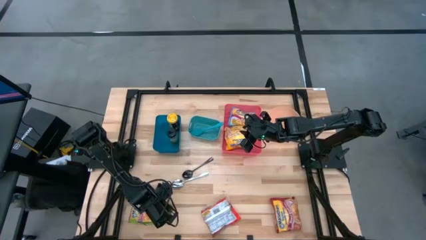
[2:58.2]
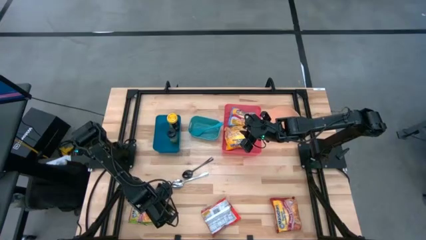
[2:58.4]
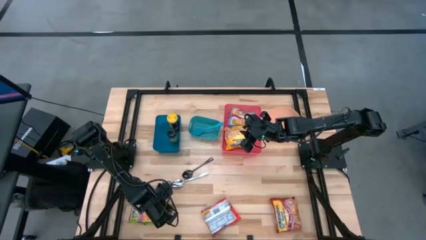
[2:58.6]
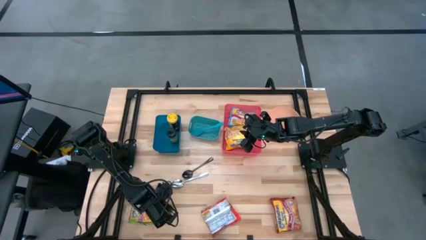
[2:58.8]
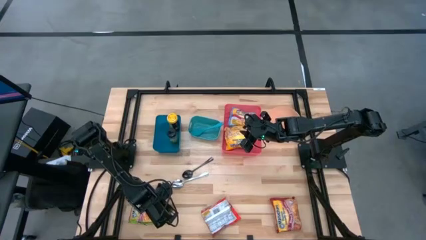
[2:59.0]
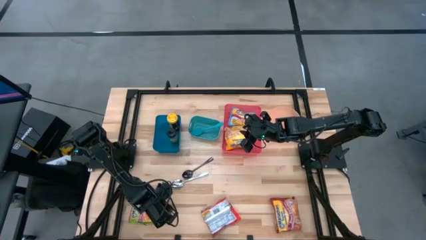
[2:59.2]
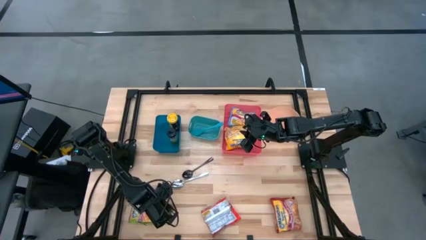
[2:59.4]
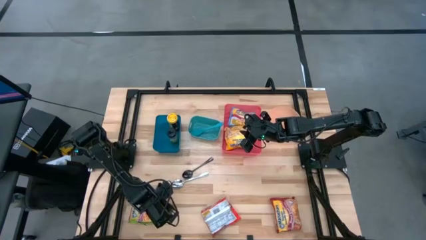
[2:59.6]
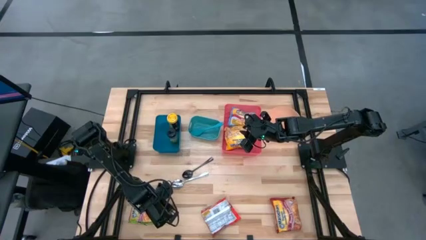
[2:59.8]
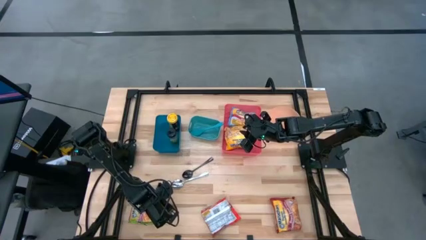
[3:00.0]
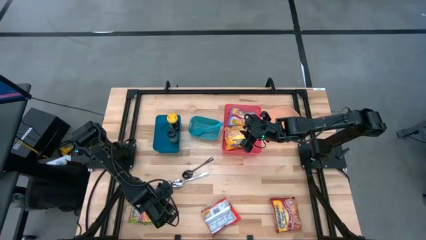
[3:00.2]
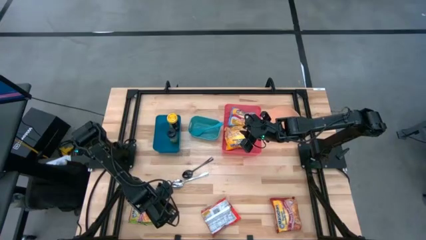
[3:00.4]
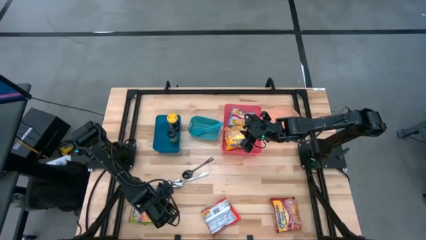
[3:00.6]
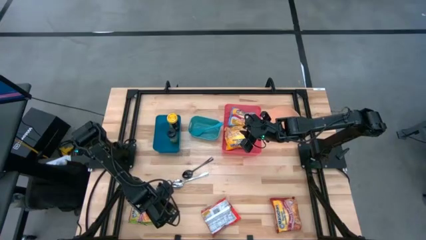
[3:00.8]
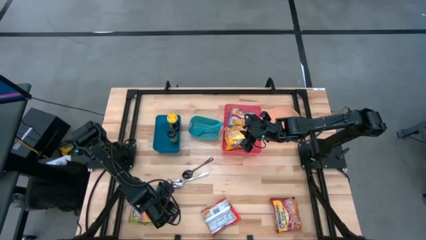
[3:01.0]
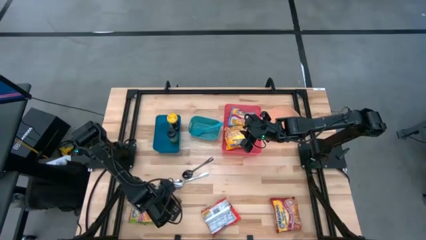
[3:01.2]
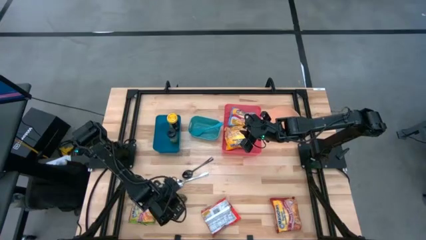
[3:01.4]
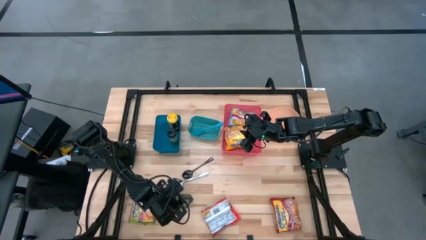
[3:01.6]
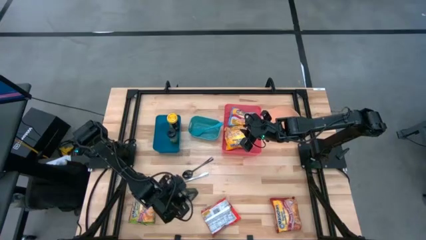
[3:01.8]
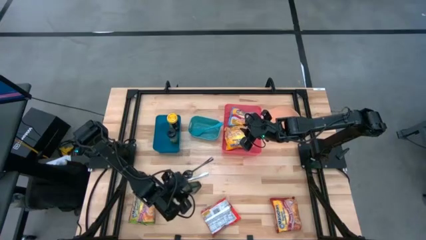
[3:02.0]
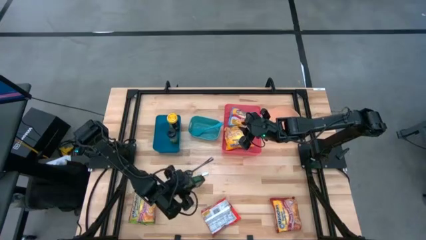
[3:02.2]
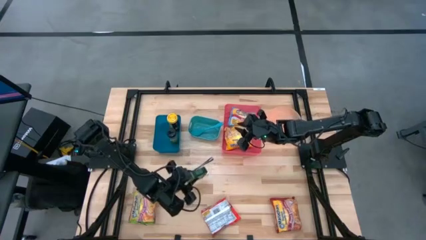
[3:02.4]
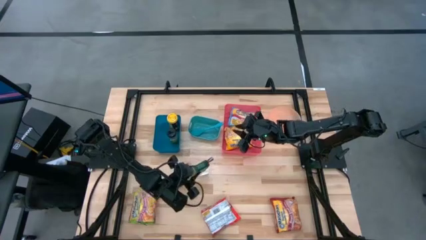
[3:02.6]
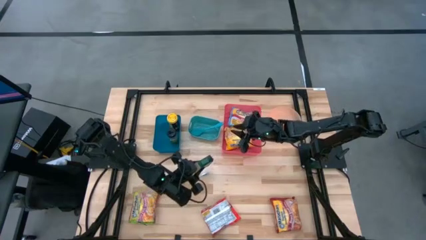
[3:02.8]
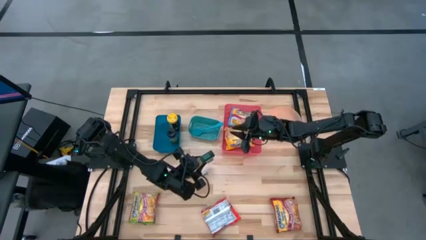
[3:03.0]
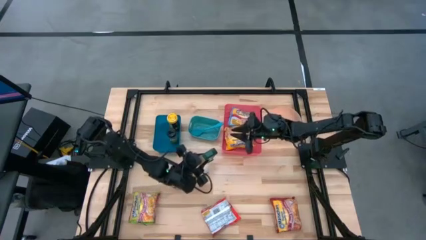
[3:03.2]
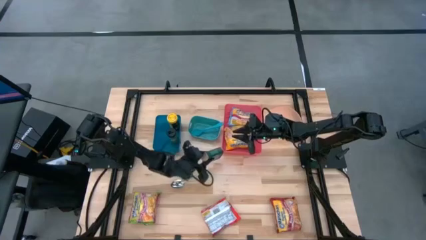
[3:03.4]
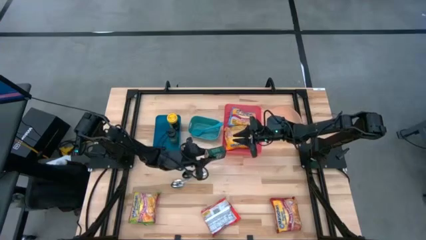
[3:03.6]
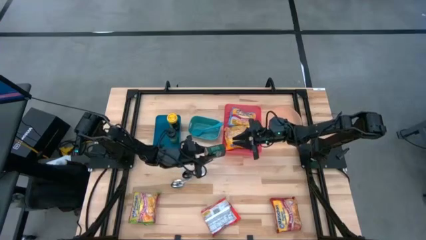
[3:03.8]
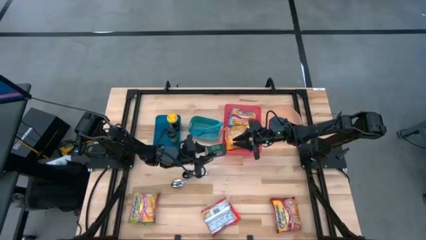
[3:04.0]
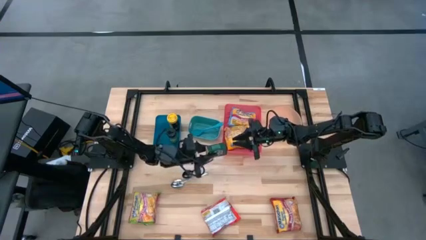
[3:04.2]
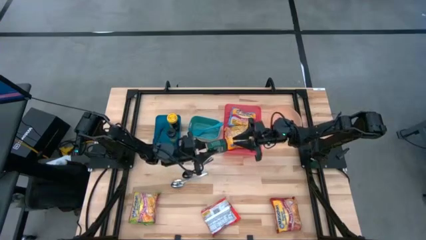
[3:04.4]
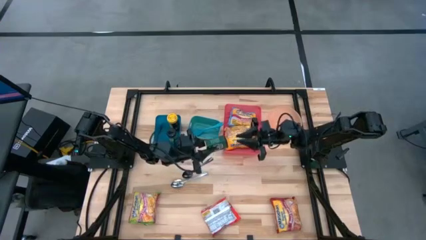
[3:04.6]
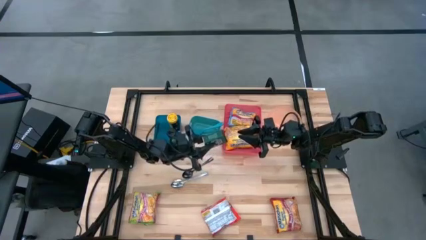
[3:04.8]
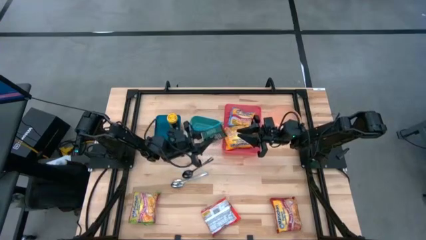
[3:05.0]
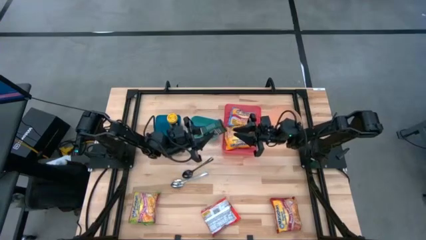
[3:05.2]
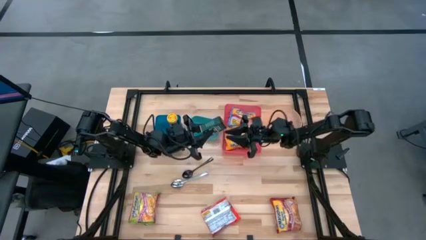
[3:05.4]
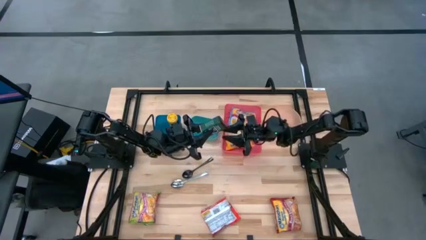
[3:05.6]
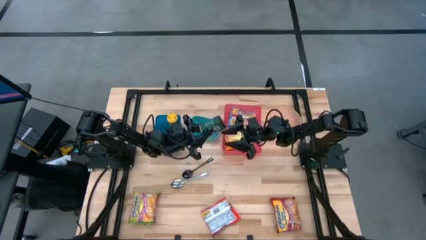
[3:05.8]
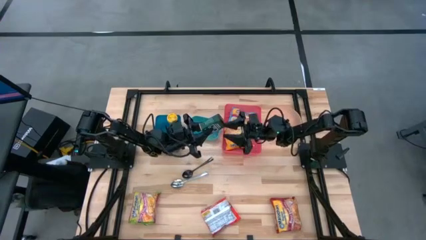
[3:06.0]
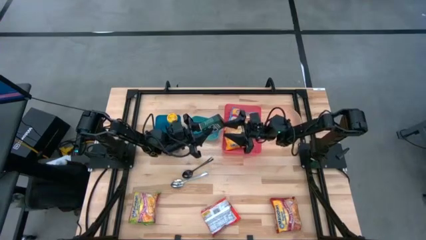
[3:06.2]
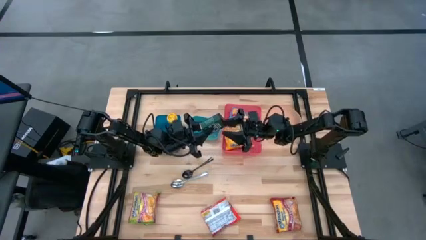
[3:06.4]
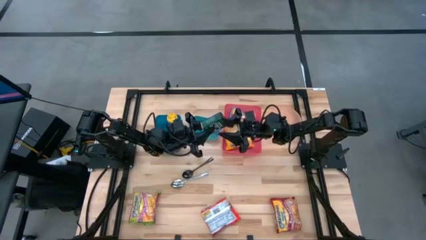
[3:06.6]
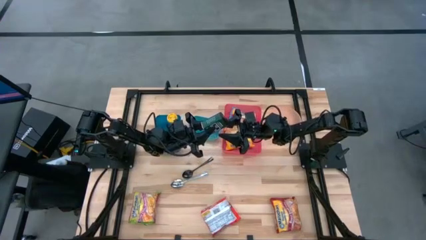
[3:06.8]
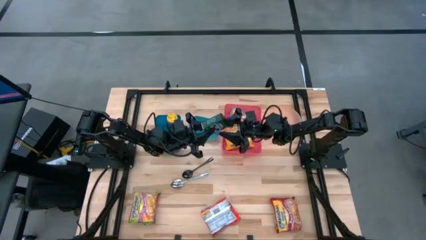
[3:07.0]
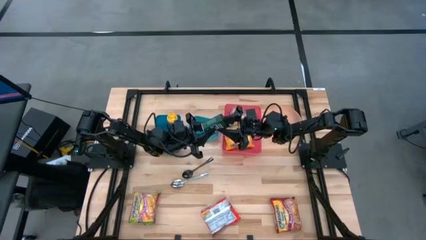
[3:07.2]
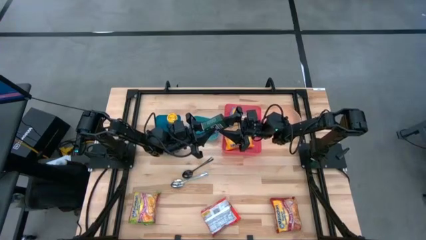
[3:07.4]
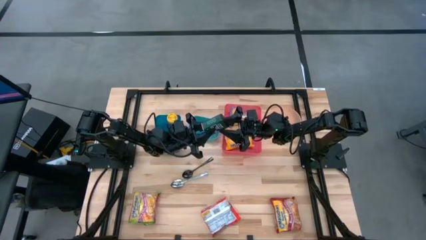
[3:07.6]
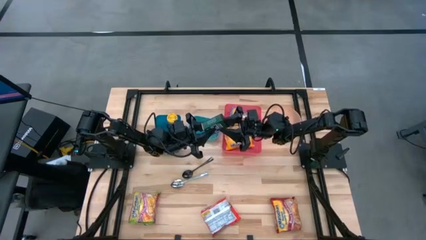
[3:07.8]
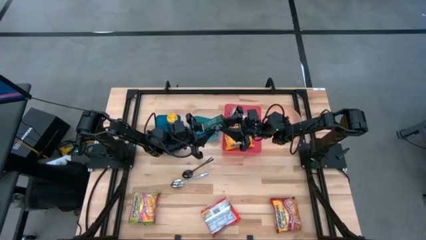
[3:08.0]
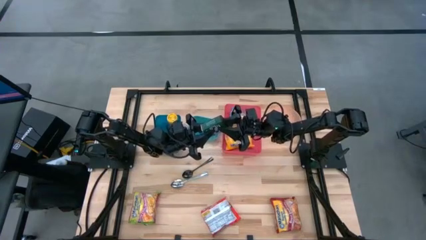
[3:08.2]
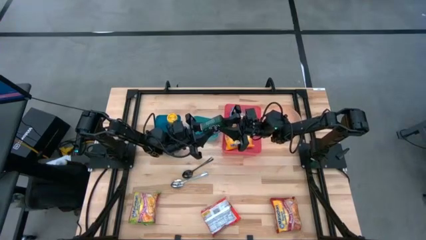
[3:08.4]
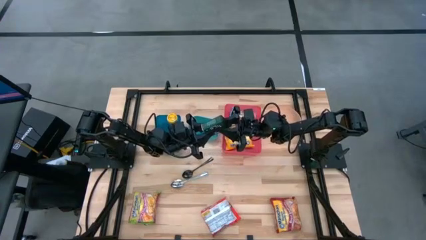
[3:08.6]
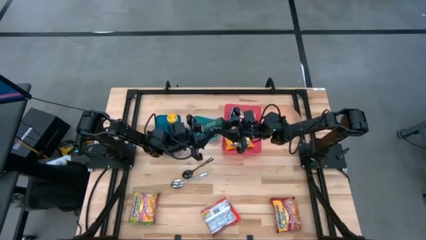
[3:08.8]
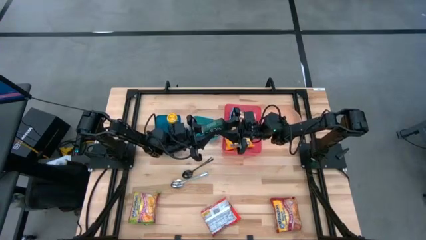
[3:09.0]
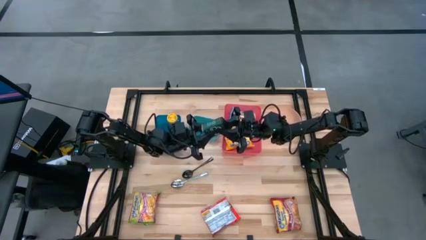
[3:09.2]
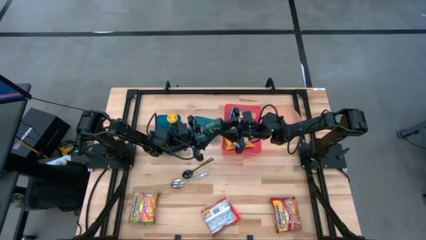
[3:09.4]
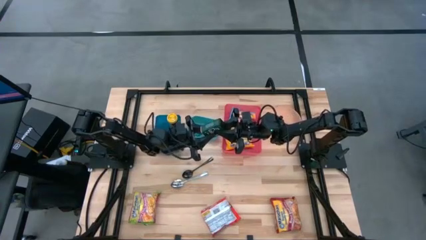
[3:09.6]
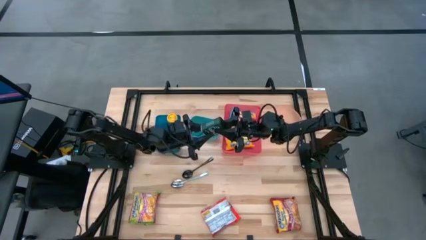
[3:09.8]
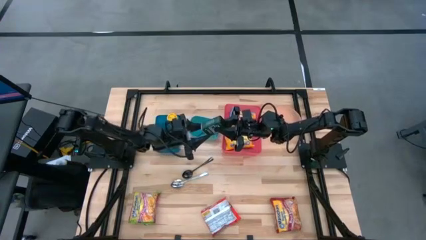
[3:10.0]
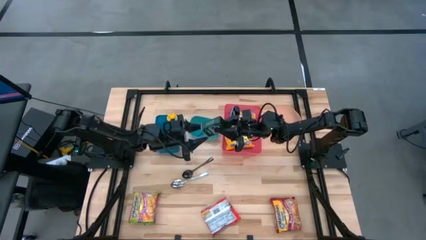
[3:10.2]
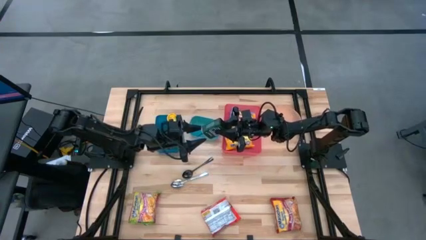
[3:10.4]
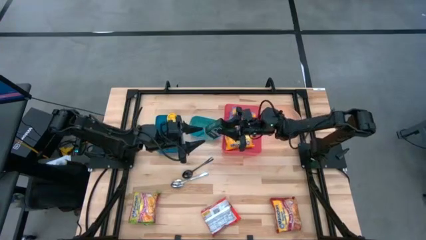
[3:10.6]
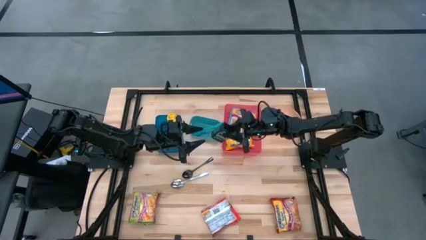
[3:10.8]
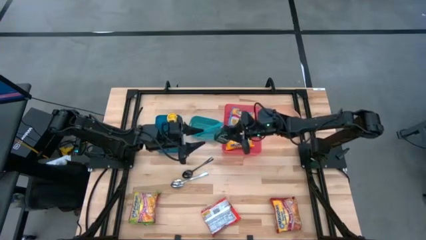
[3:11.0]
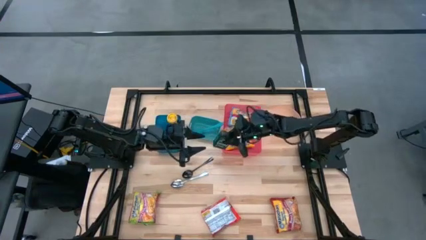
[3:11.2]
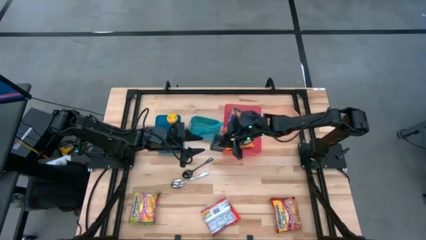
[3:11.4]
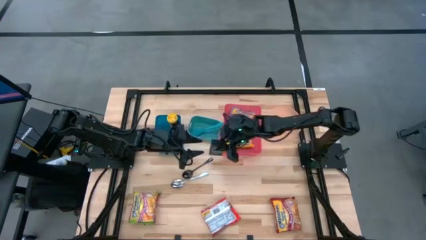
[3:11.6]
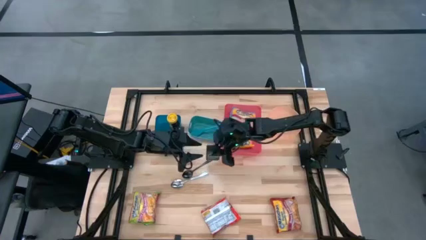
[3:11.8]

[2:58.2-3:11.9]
Task: Pick & Place Food Item
Put the black seasoning can into the blue bin

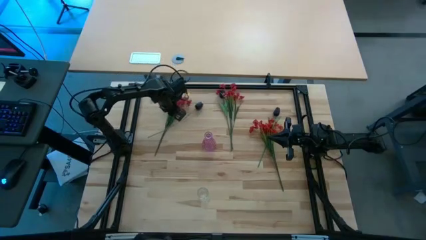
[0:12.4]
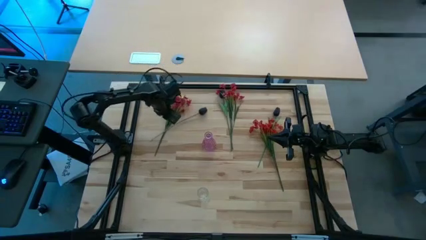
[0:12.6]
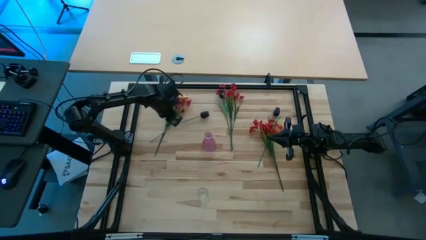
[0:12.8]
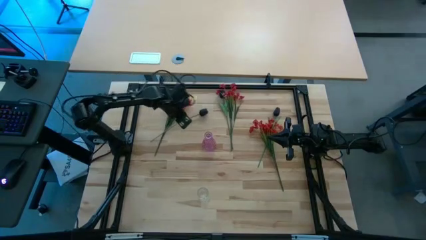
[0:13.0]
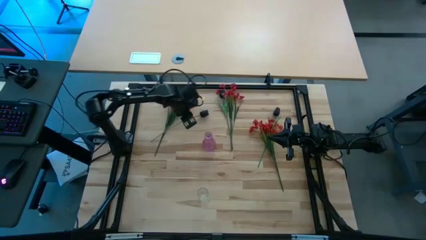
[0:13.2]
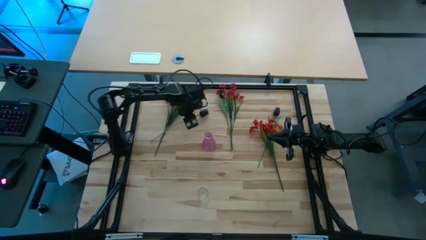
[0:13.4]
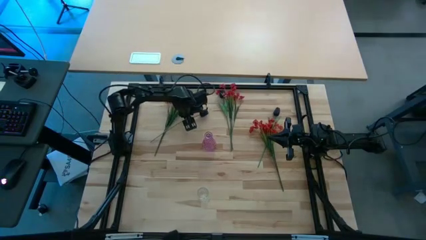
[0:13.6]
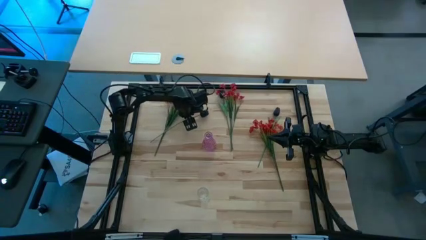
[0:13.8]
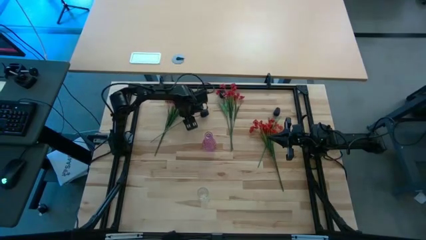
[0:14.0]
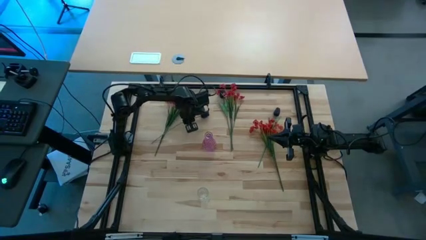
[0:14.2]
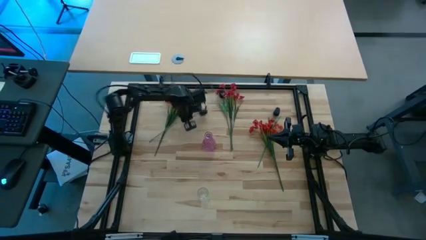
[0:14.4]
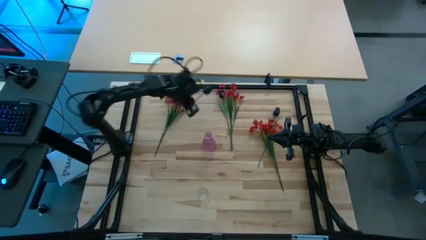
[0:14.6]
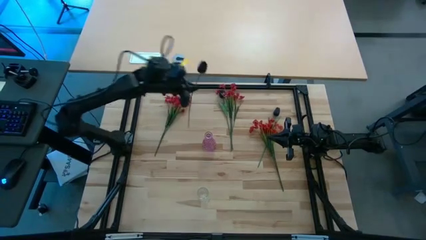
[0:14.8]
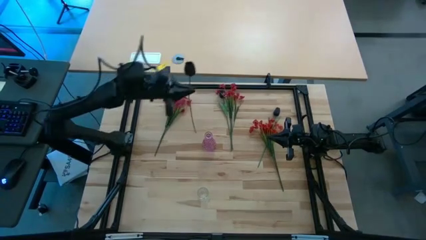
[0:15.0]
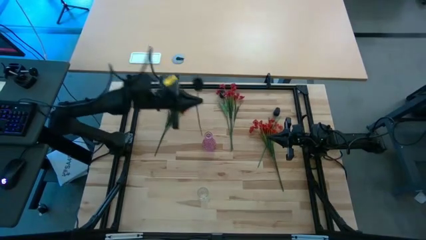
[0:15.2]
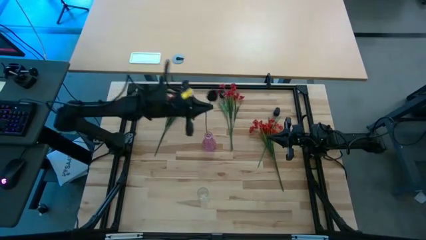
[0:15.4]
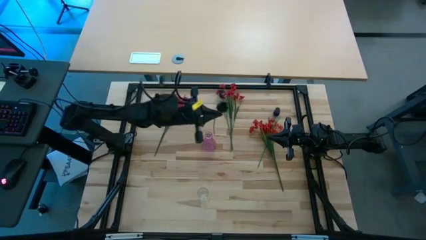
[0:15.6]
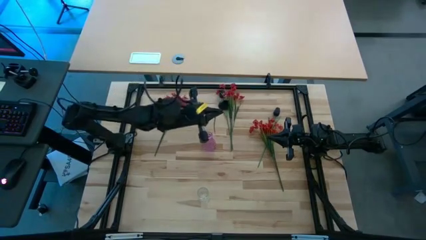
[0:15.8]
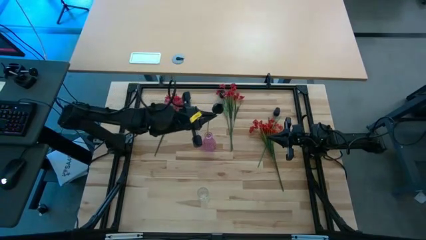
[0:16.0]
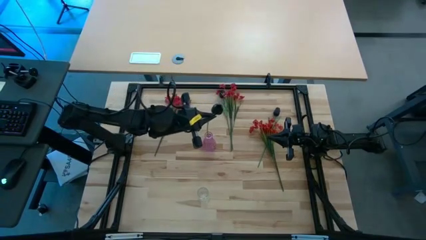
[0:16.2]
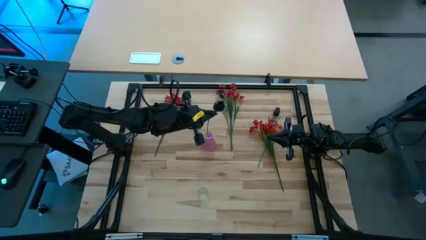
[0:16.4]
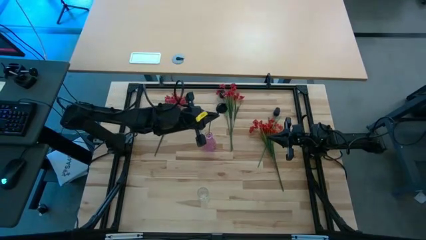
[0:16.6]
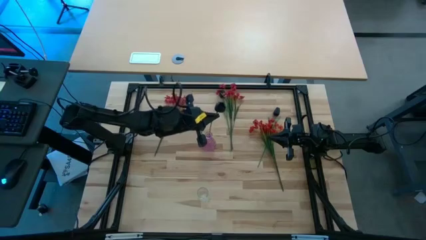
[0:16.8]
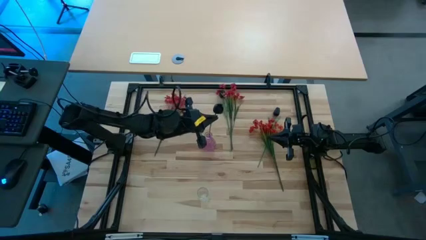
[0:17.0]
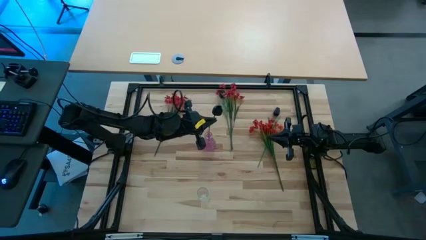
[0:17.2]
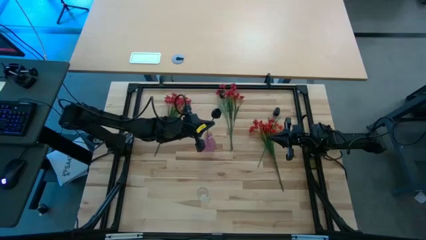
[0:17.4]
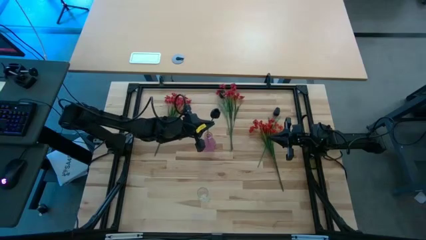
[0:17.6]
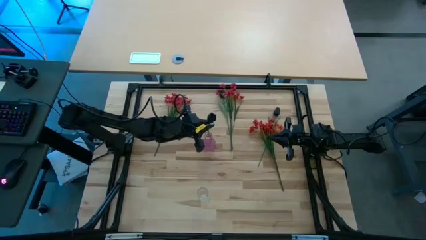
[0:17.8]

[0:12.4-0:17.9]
Task: Sort flowers into vase by color
Put the top left black tulip into the pink vase
